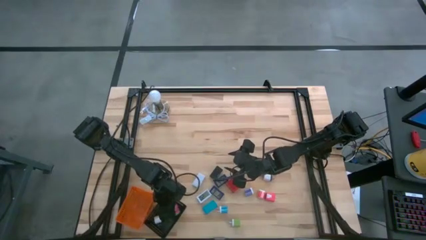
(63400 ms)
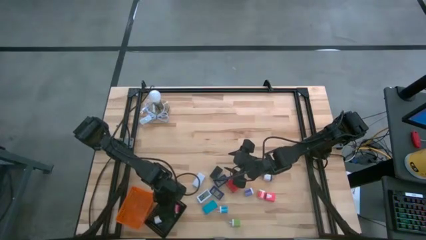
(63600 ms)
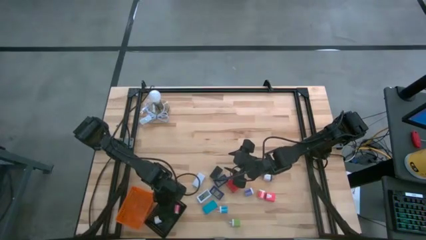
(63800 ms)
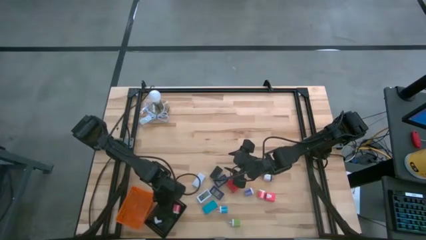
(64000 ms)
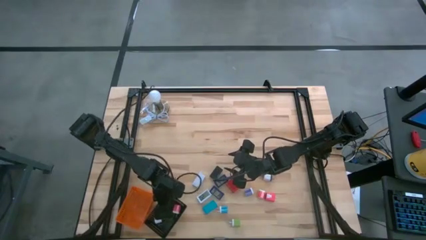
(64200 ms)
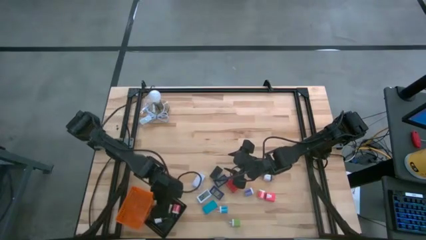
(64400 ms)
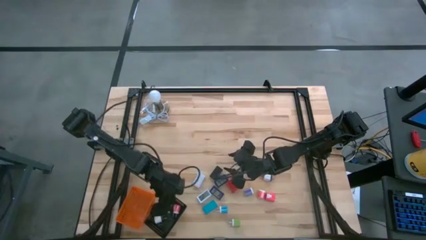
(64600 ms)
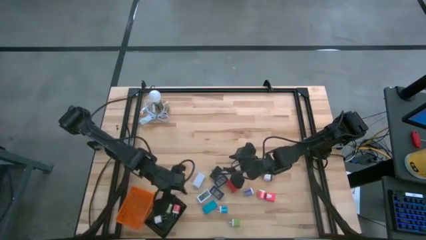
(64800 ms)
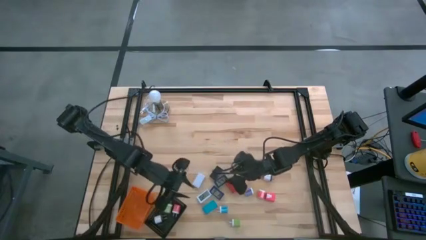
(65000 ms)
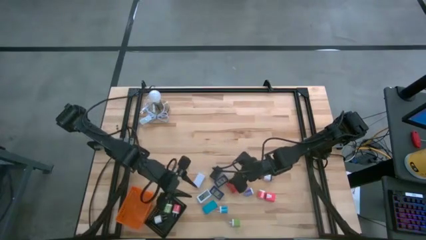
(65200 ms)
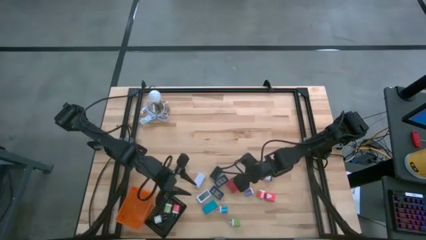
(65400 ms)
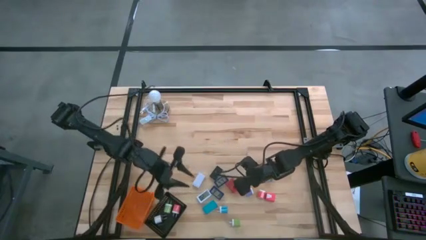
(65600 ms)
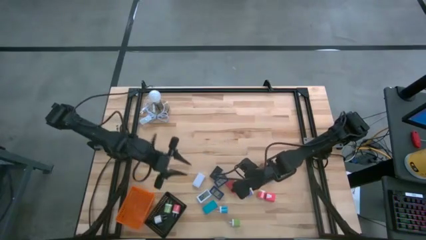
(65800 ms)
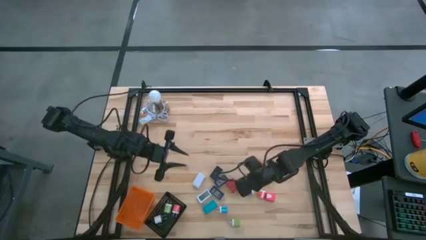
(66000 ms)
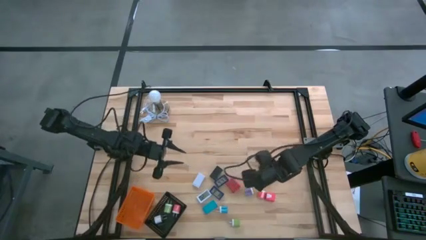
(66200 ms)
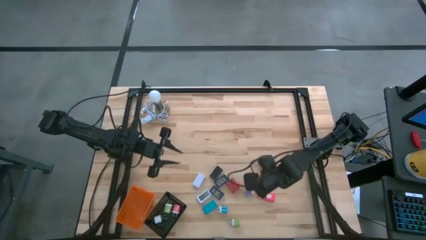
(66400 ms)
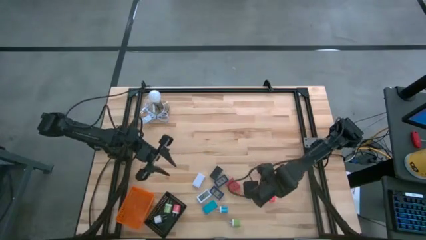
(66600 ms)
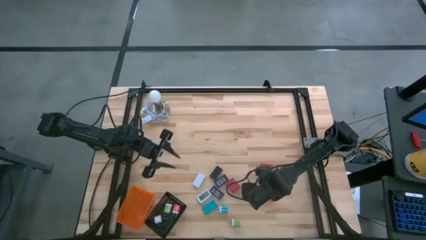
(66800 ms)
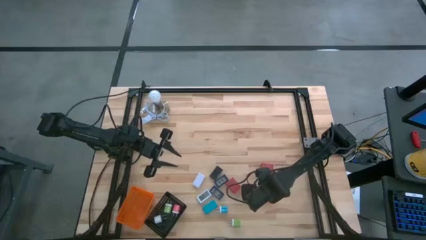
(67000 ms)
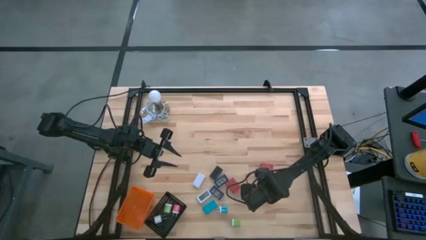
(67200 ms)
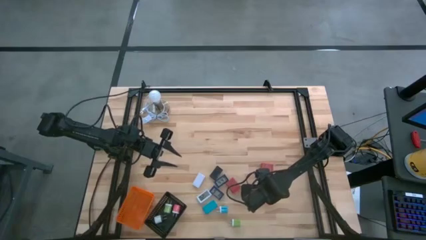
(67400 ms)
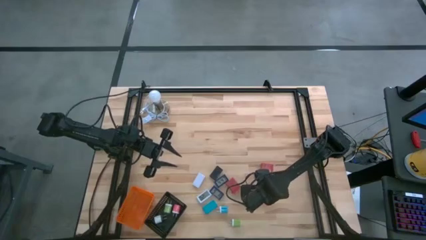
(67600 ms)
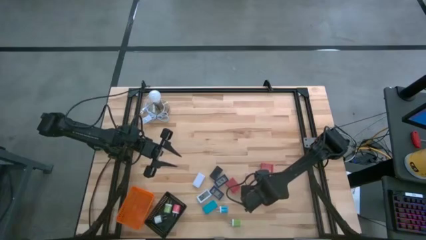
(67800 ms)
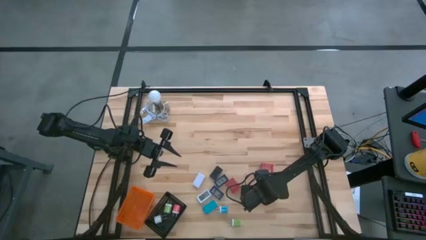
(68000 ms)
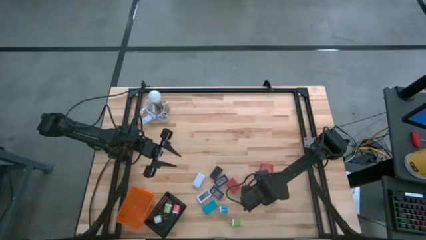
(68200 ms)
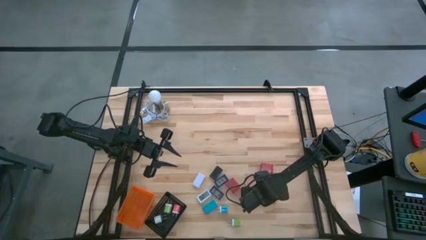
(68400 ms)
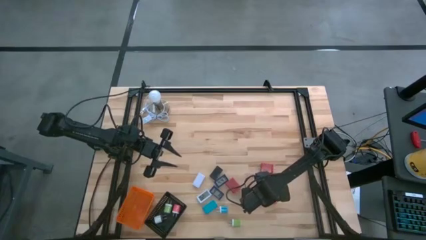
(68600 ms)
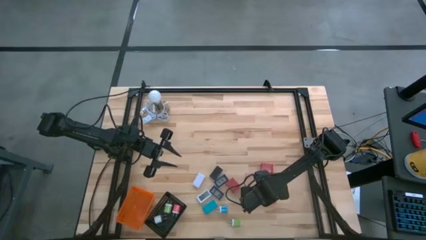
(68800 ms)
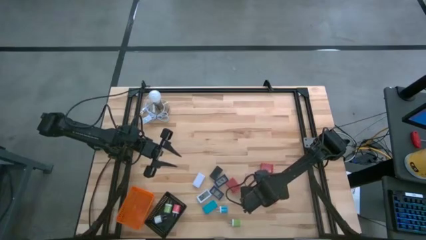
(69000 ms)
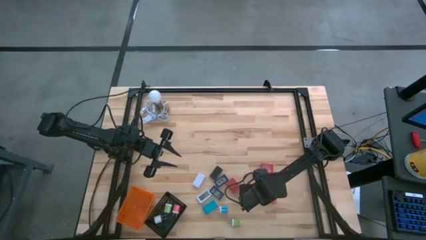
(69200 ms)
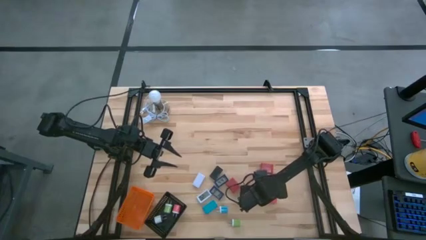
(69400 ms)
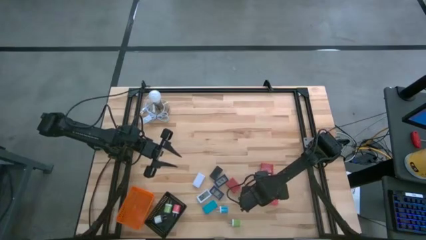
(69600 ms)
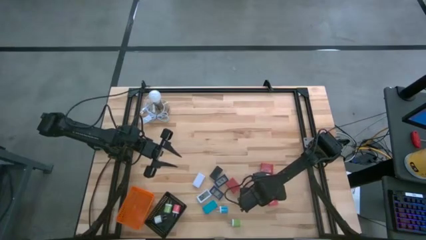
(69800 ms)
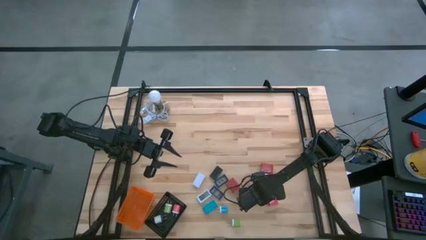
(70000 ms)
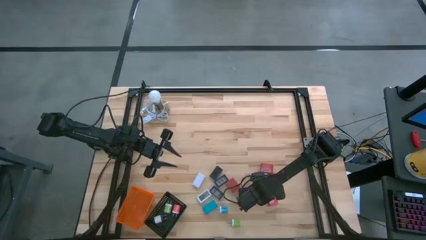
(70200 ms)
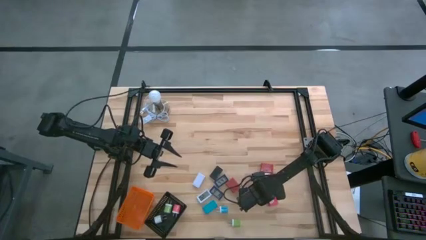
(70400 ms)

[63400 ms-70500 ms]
Task: Pick & Place Office items
Put the pink white charger adapter into the black basket

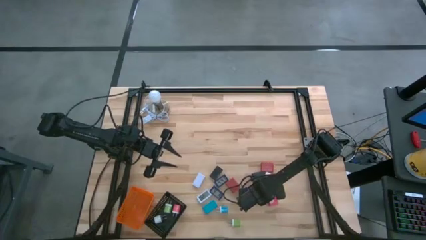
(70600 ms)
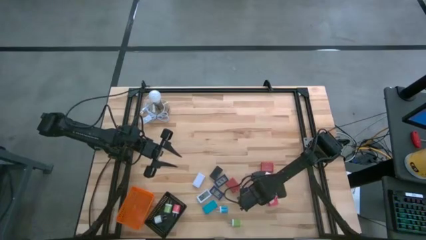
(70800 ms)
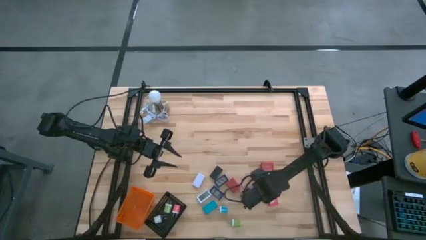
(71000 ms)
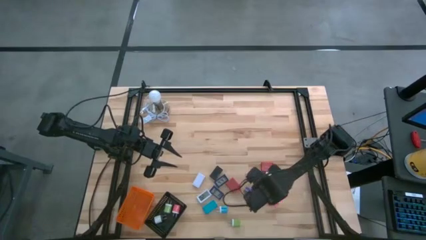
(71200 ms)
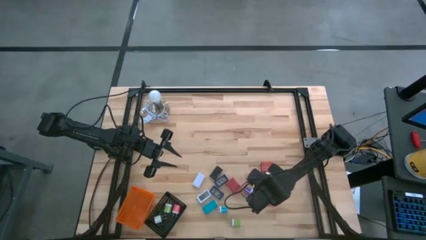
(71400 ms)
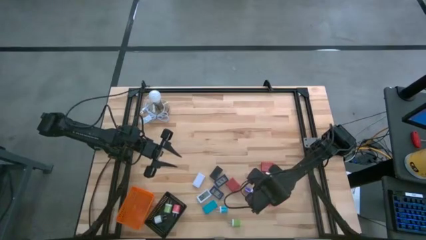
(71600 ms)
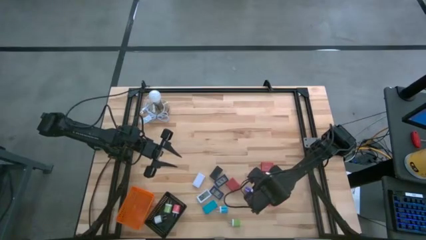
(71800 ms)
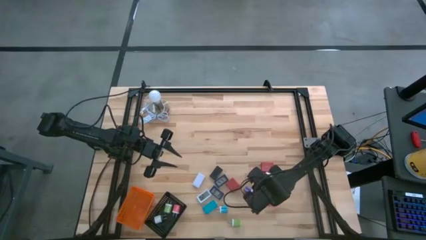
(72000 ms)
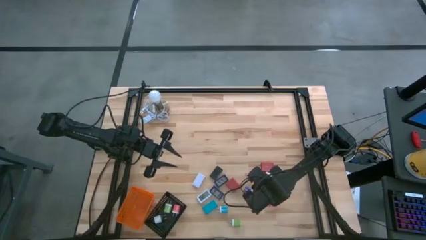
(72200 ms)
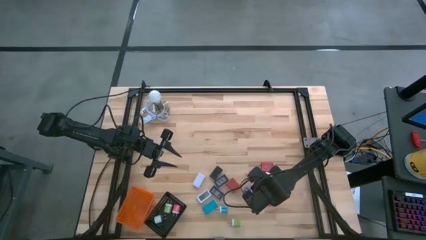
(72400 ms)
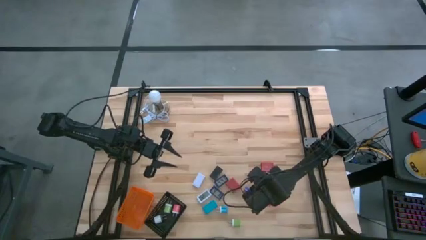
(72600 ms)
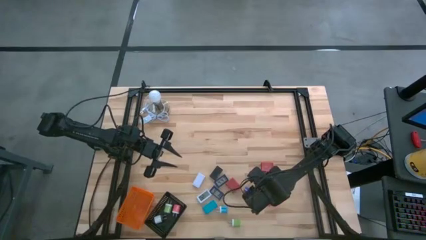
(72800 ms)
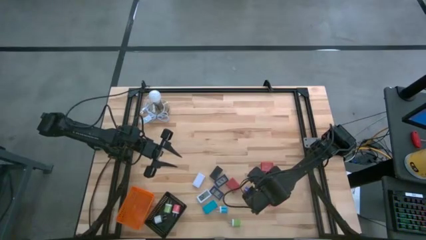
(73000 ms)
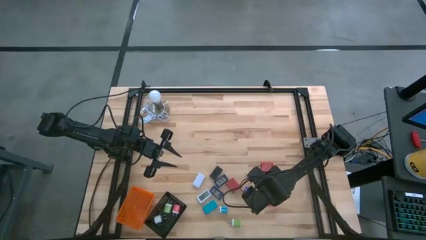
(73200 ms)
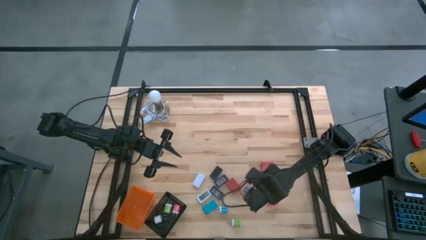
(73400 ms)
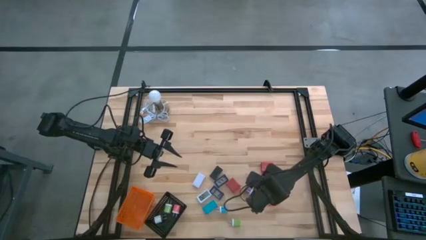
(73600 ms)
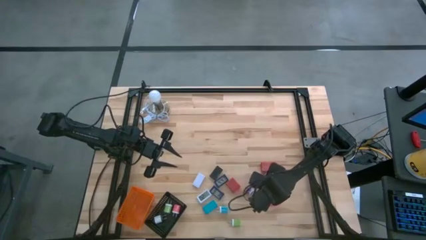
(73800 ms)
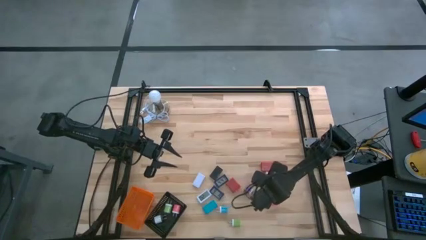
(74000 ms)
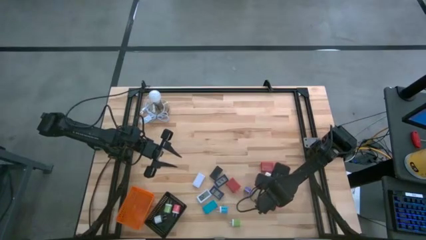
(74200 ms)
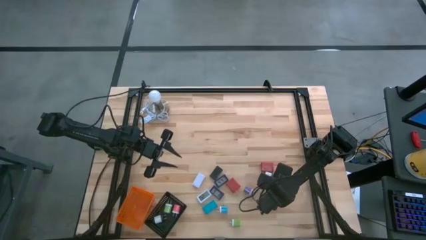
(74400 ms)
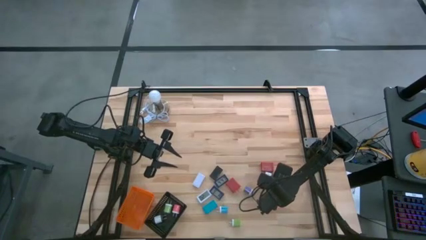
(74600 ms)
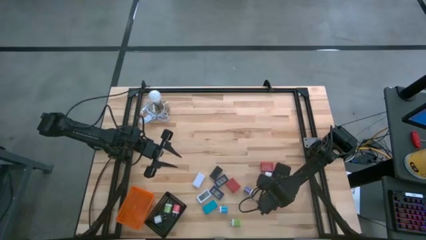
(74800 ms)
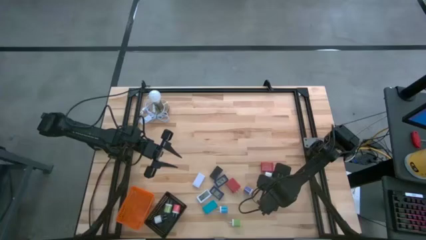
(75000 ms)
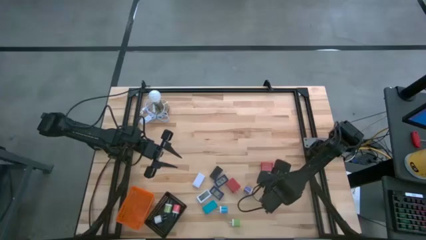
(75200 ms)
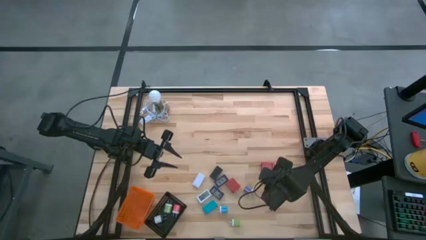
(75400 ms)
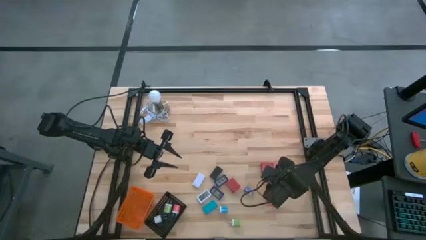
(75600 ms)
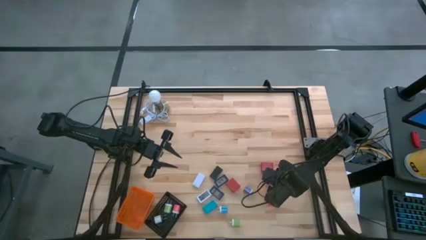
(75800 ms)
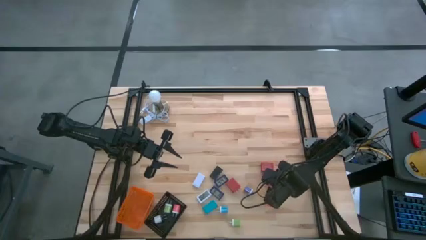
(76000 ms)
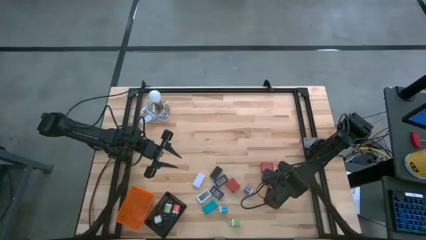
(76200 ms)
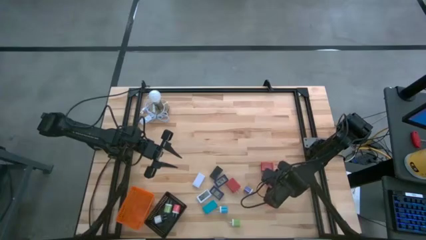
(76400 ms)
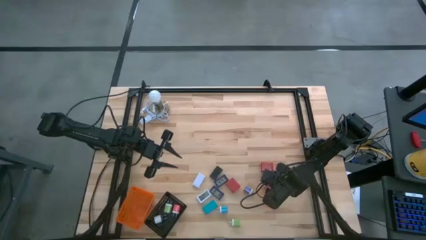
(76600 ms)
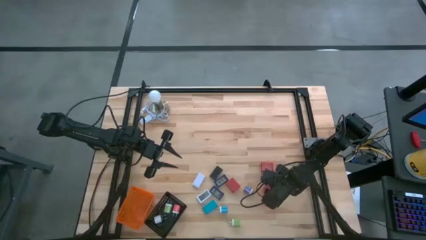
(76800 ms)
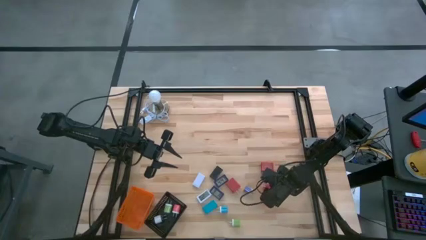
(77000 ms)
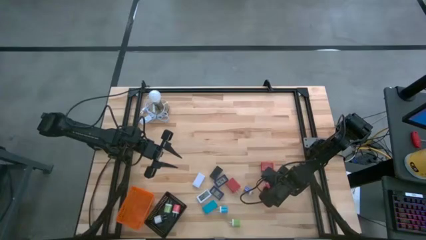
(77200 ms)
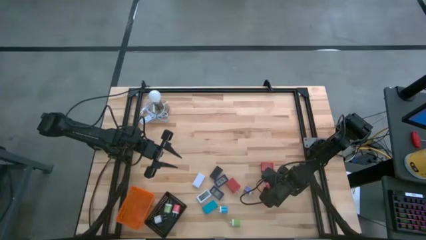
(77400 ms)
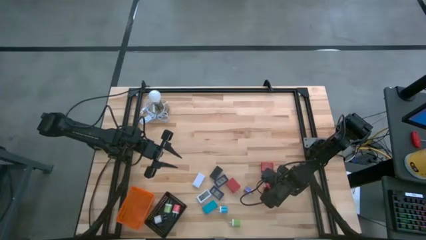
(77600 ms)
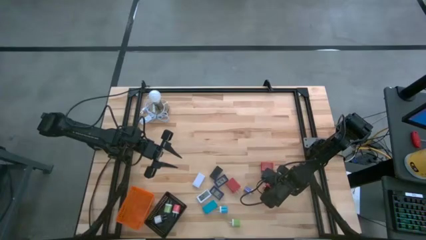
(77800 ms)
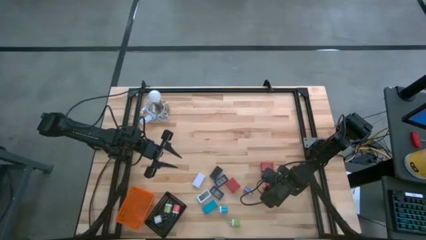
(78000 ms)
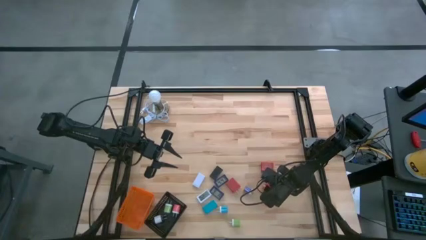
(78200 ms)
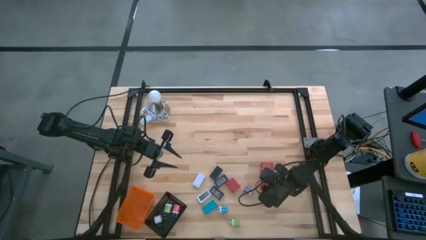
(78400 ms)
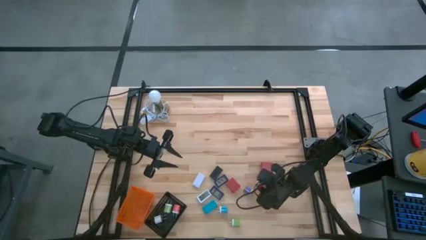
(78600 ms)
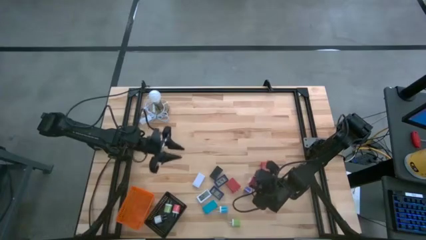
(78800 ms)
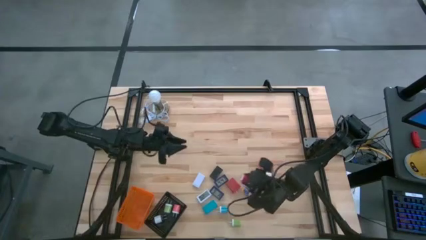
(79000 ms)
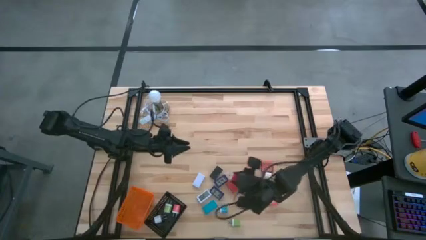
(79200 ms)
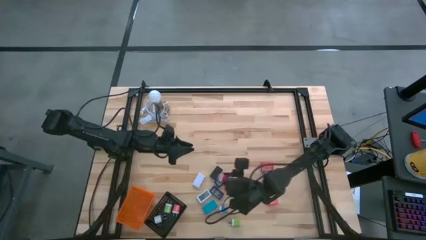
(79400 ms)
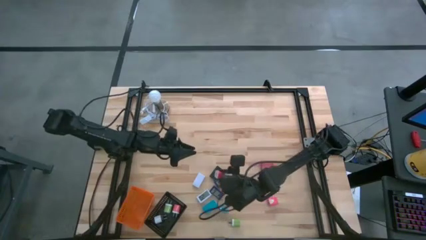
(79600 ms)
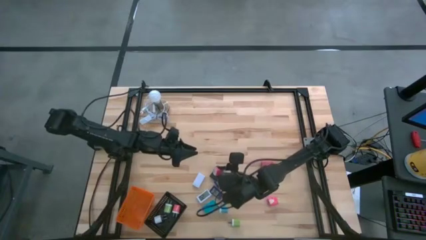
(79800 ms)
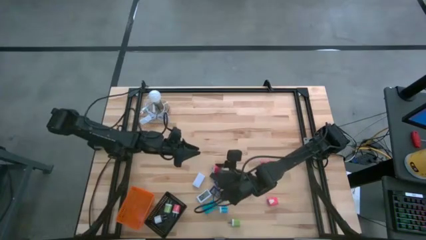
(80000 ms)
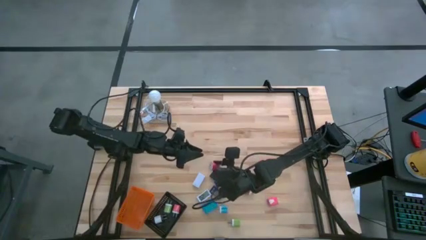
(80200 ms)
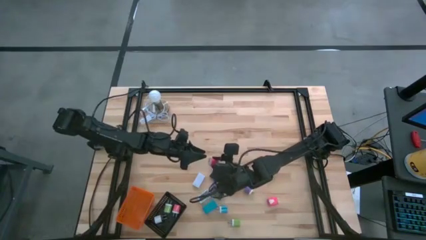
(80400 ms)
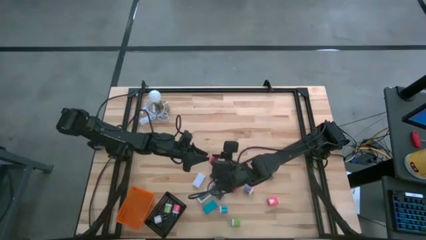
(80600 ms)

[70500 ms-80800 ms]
Put the pink white charger adapter into the black basket
